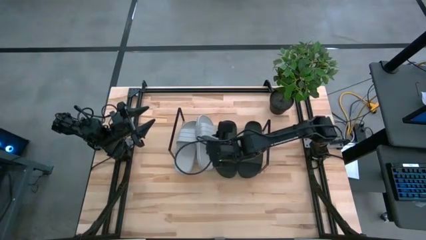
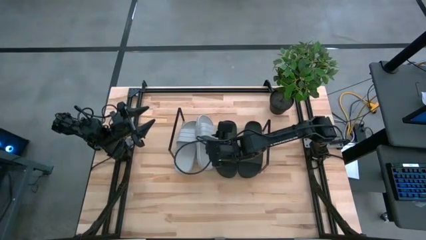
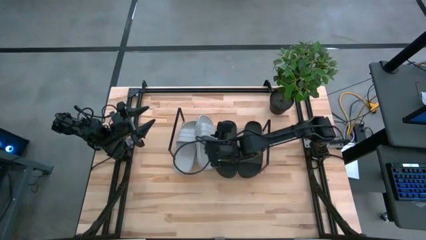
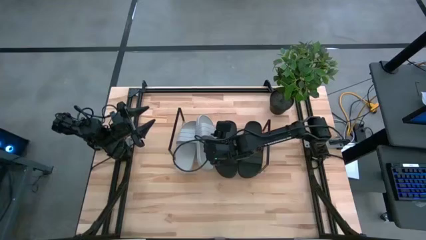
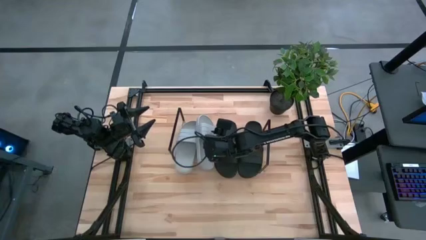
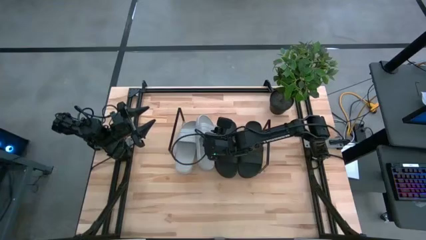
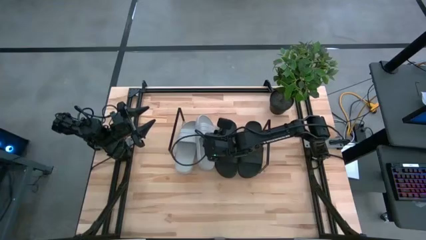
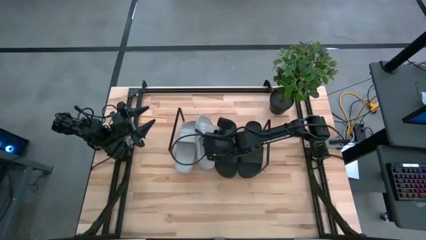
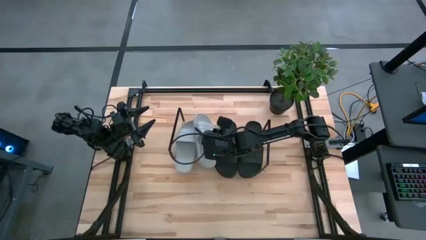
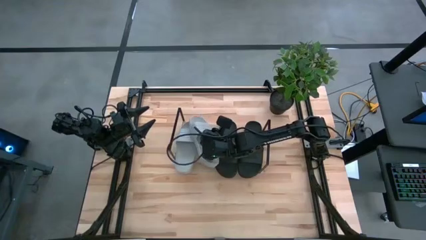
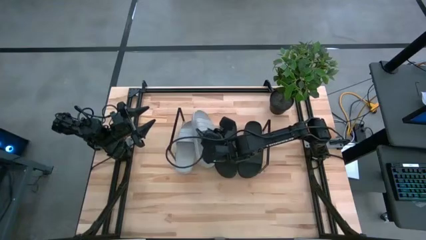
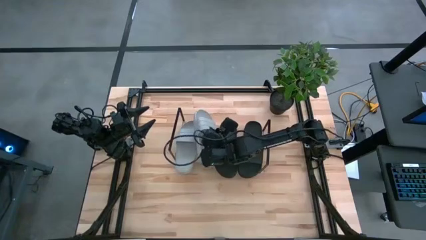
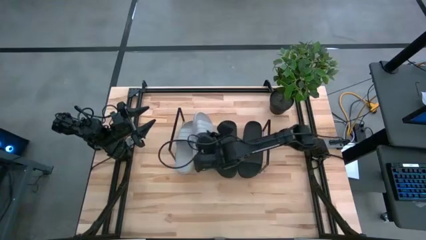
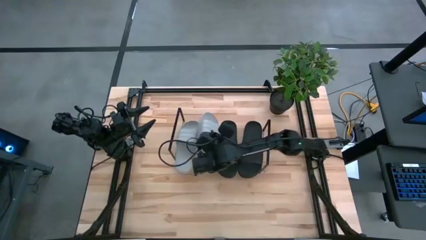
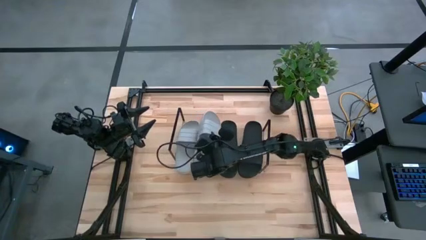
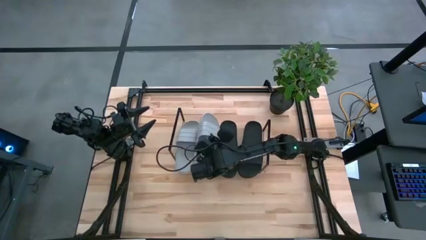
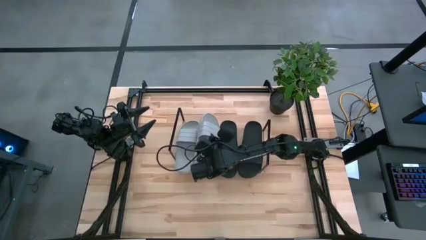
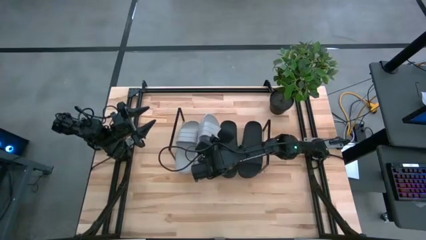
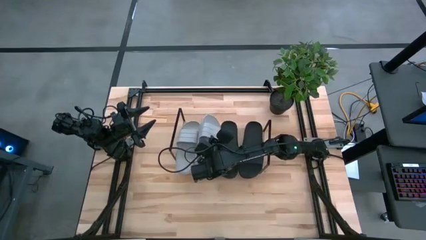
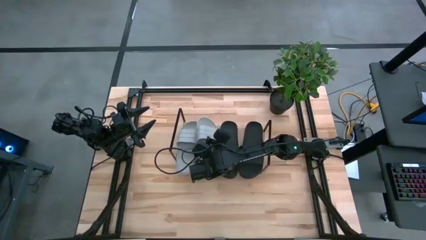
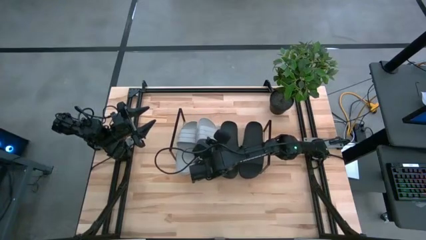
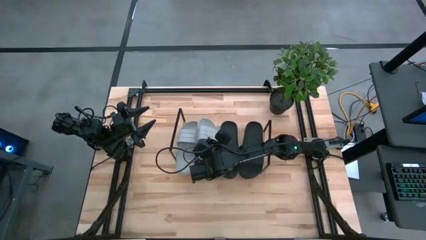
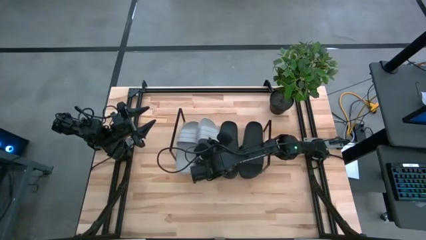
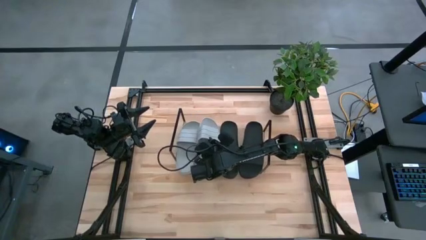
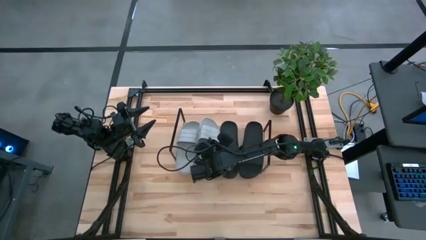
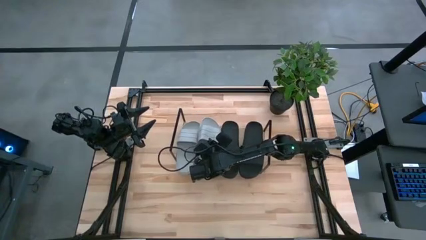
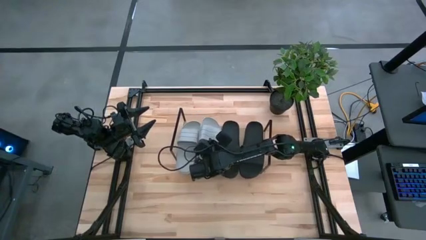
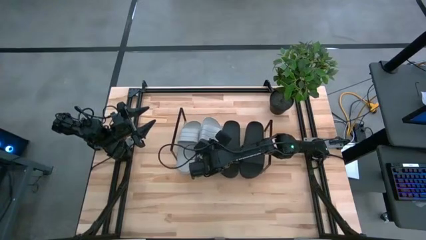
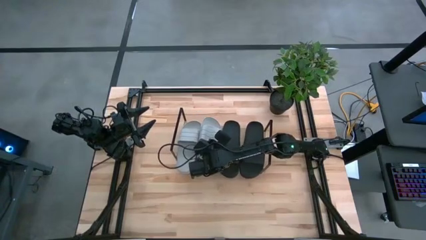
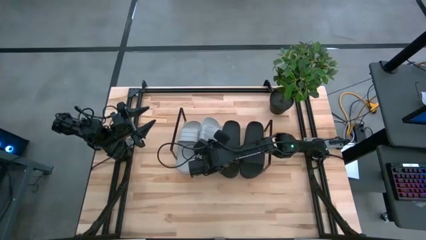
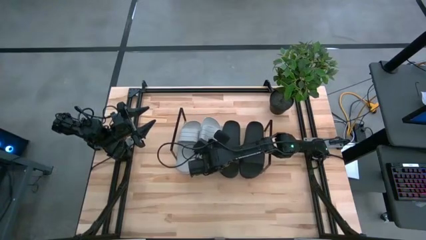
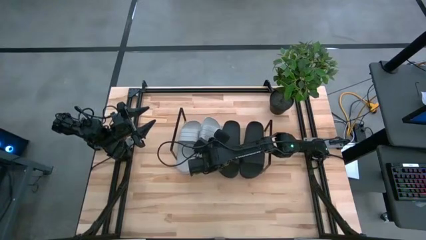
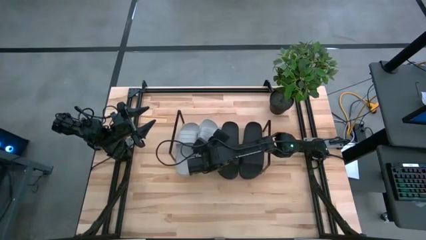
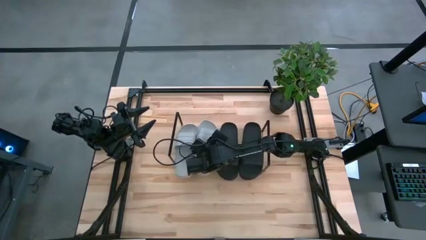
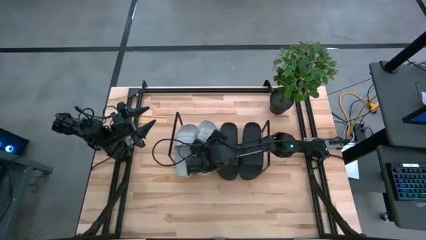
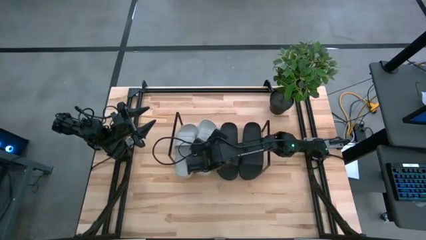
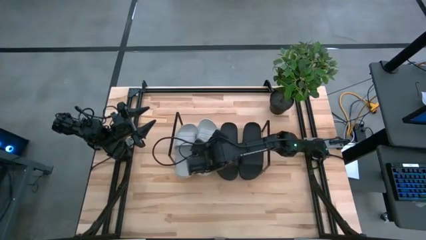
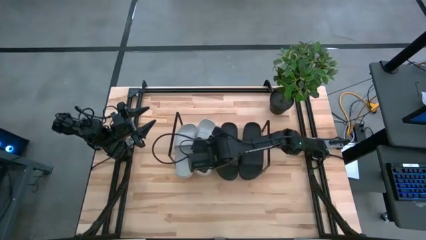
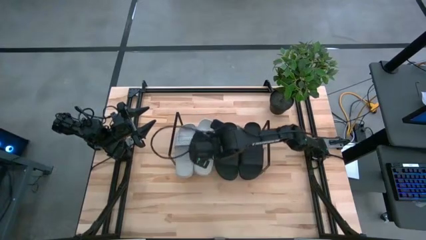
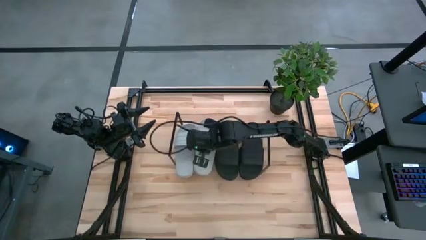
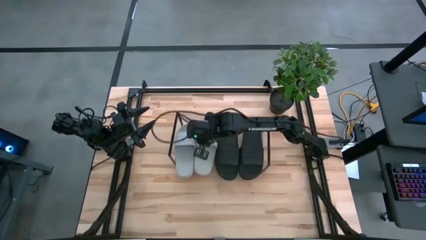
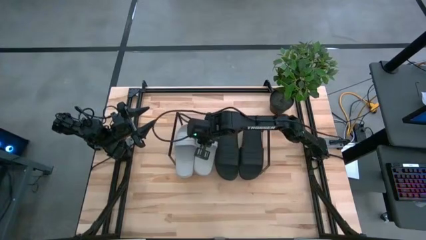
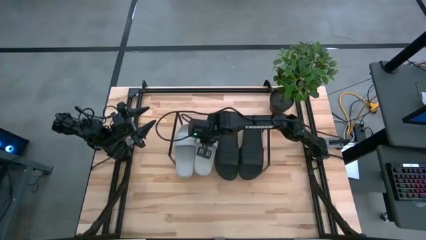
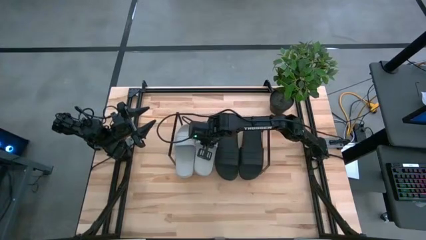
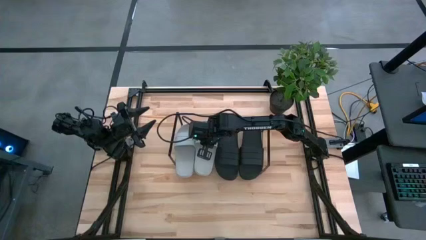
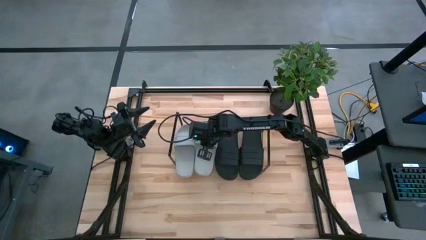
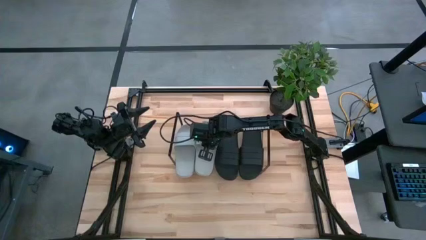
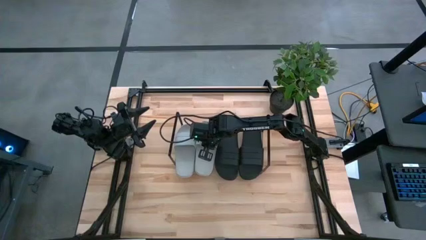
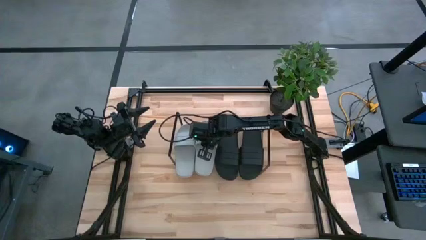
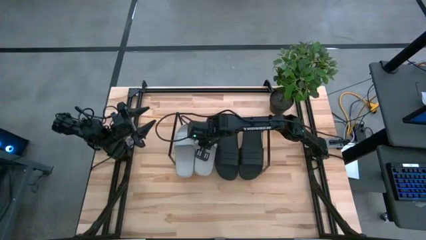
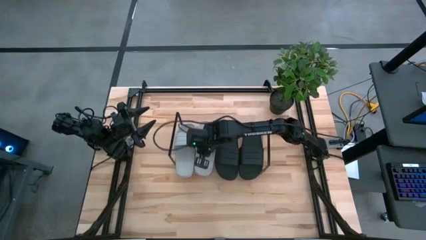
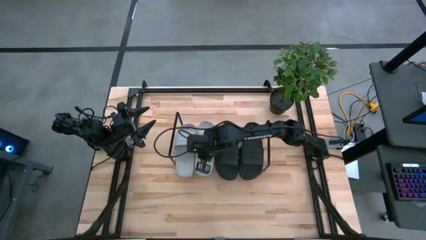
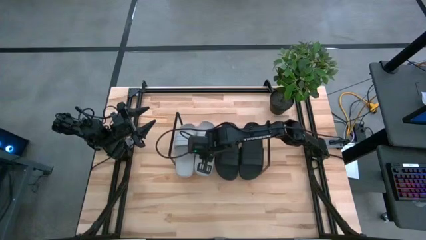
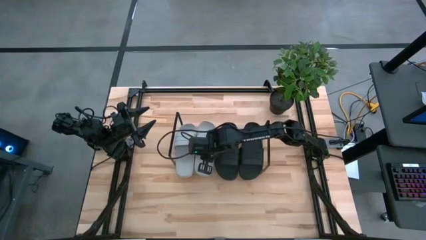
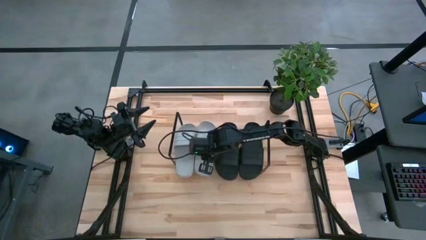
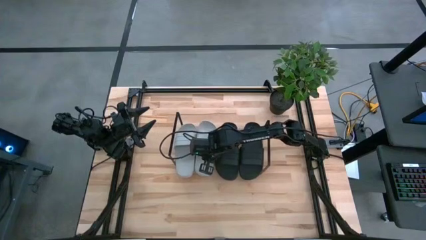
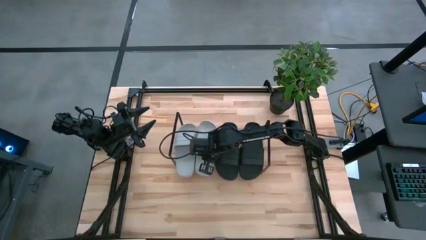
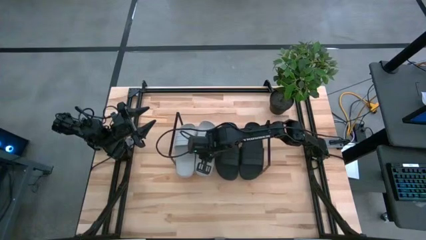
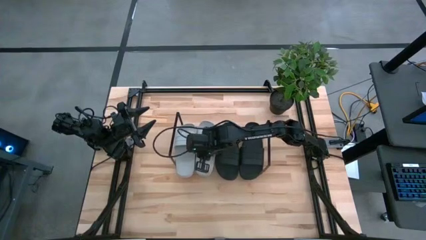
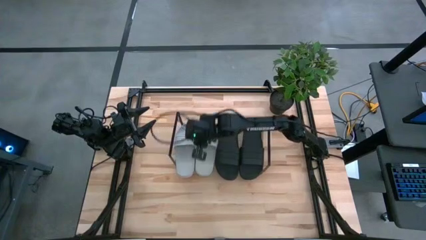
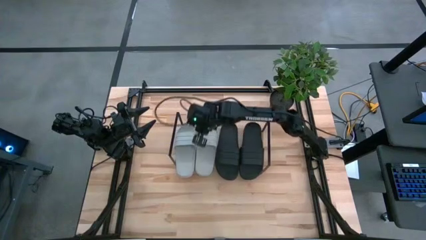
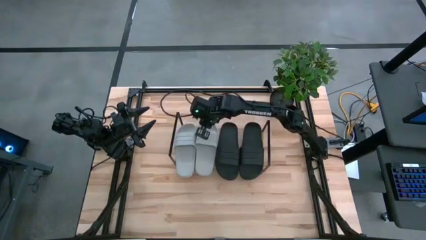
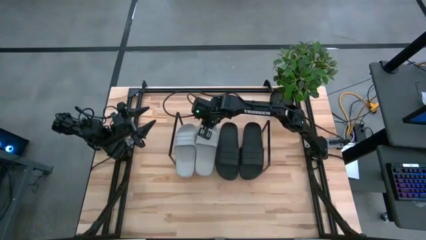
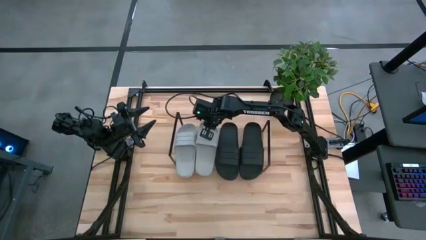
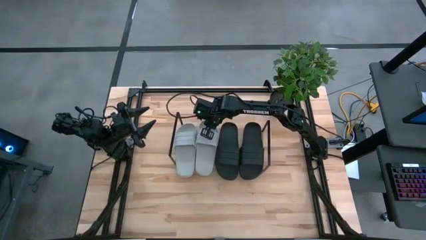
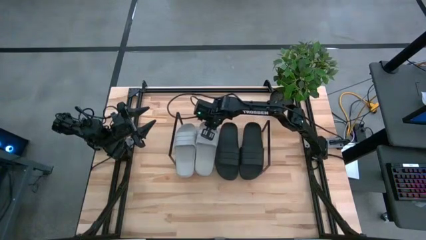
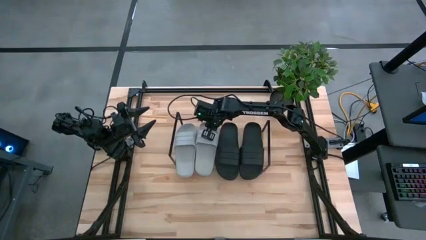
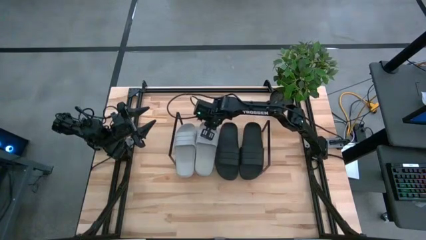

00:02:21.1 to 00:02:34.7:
Task: Pick and place slides into the shelf
Put the gray slides on the shelf
